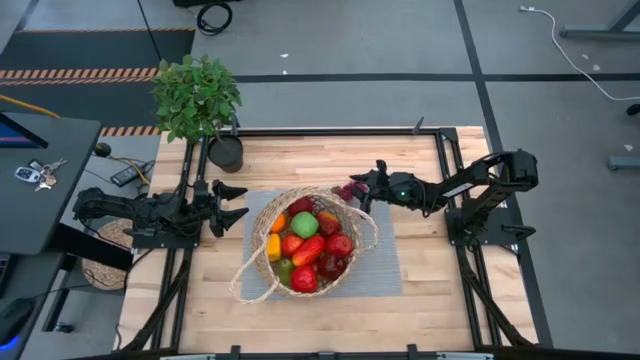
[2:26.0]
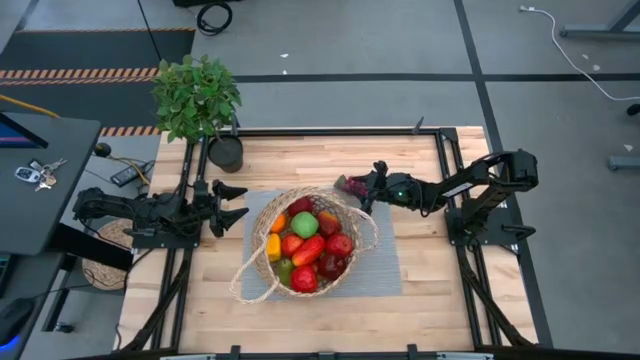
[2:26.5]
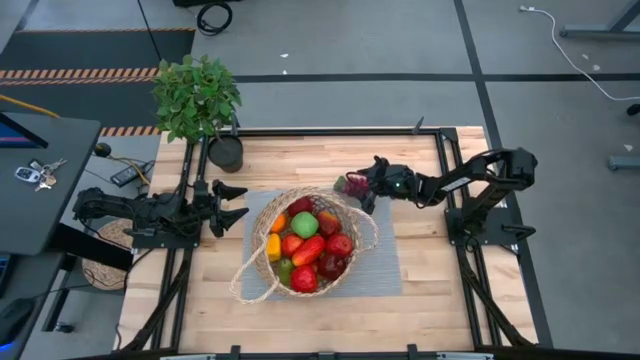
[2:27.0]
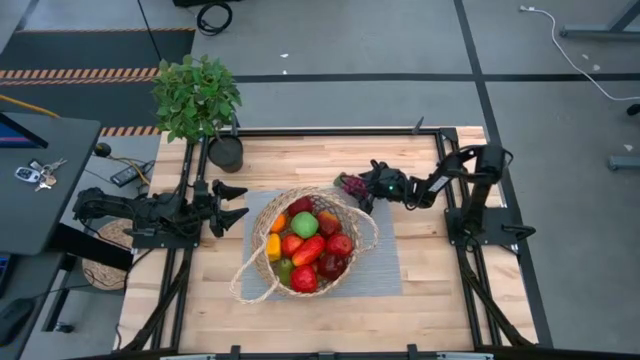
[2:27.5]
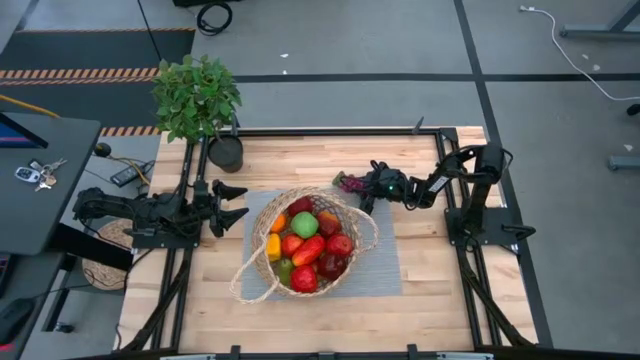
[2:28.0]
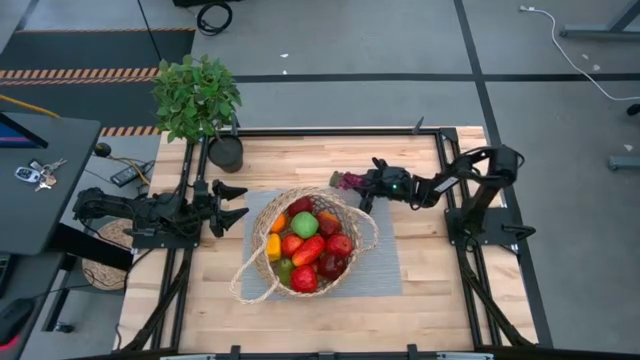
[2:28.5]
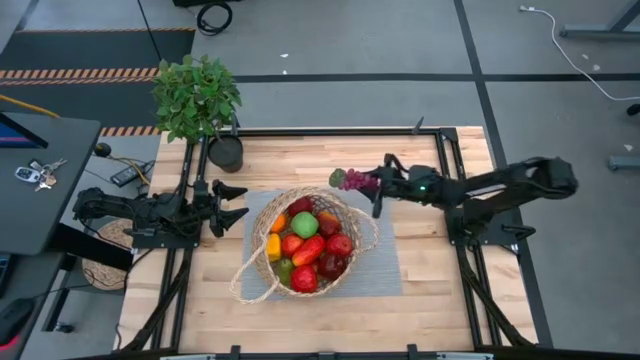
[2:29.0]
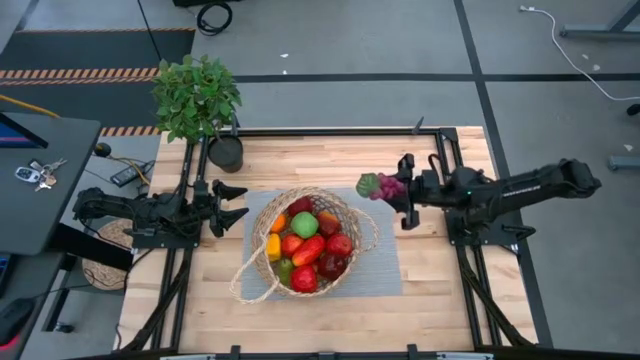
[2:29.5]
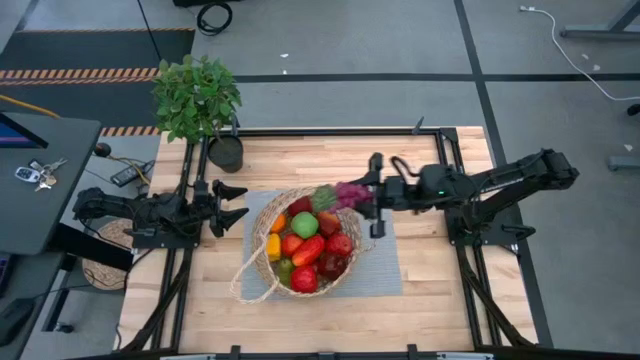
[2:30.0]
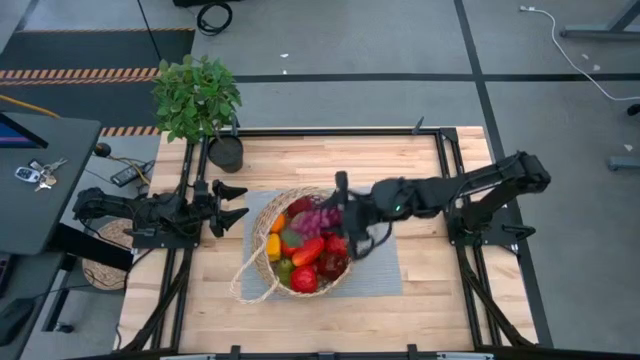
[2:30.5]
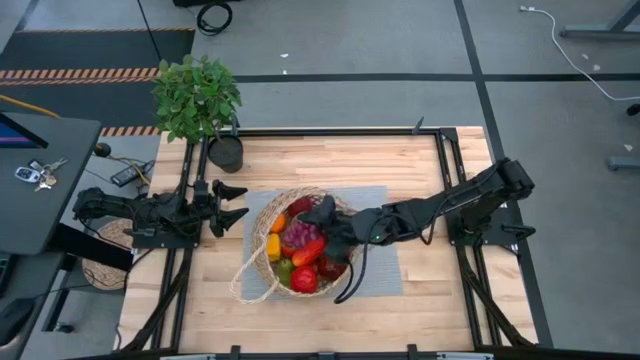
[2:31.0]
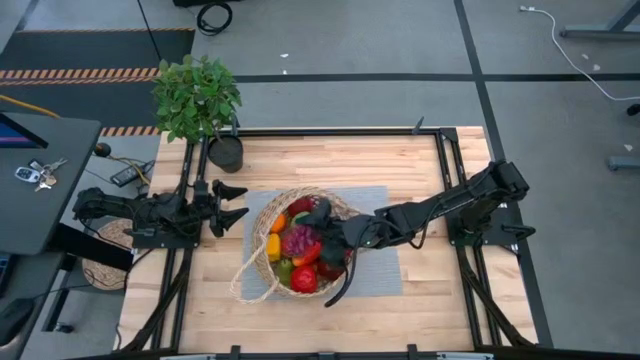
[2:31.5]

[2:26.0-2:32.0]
Task: Build produce basket
Put the red grapes into the brown basket

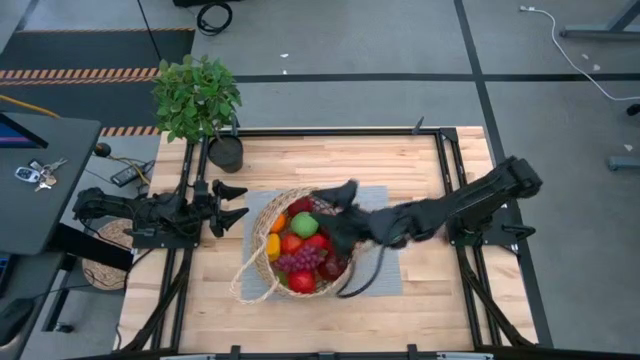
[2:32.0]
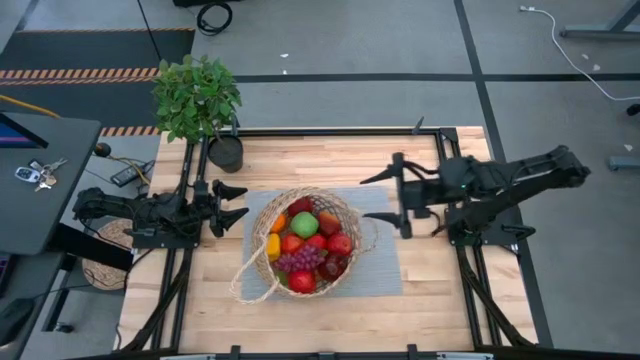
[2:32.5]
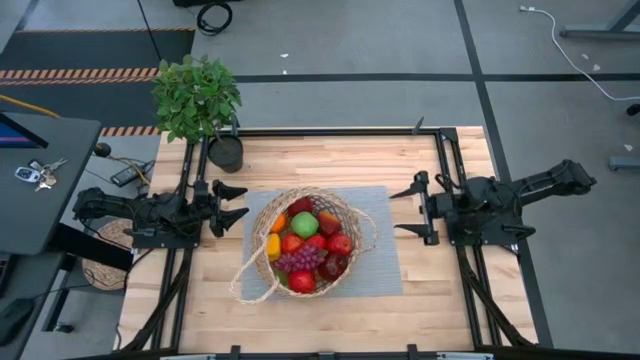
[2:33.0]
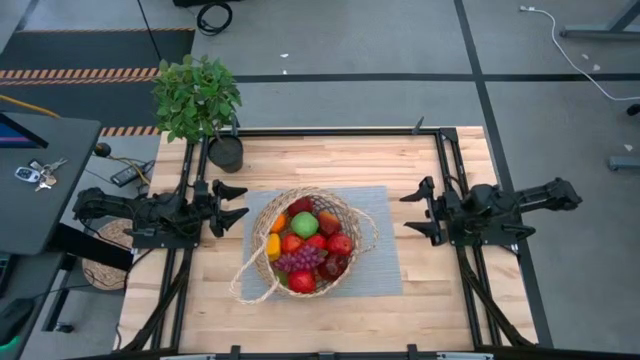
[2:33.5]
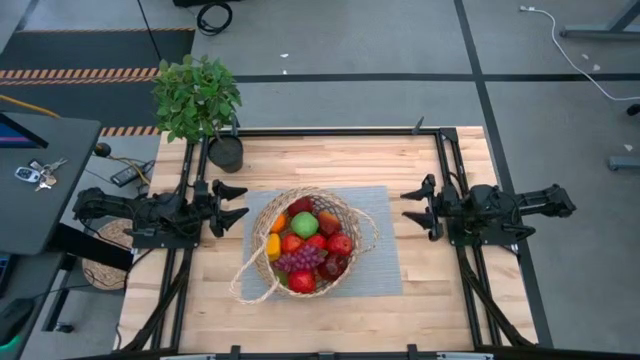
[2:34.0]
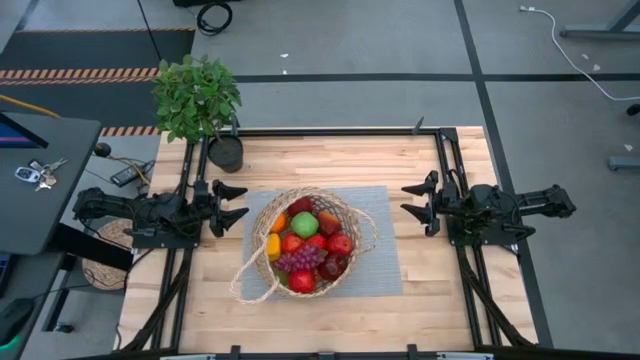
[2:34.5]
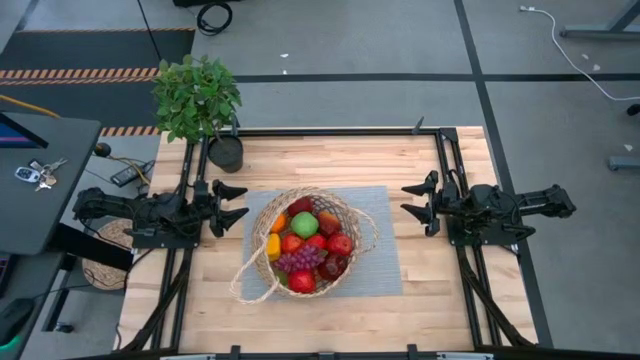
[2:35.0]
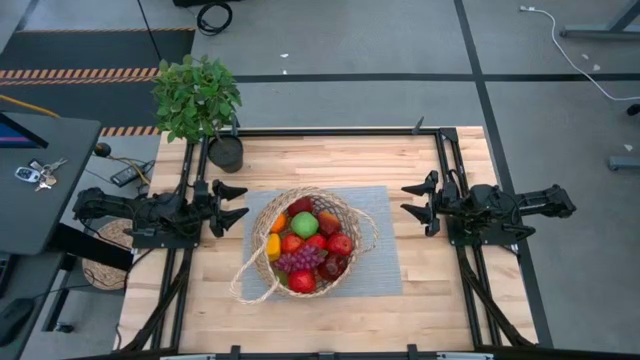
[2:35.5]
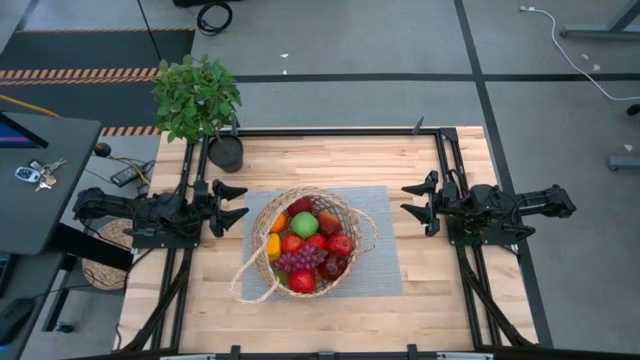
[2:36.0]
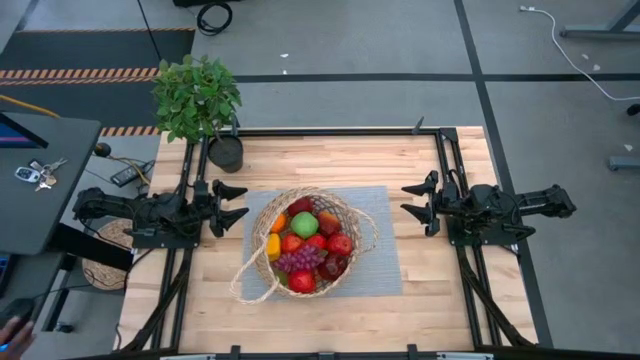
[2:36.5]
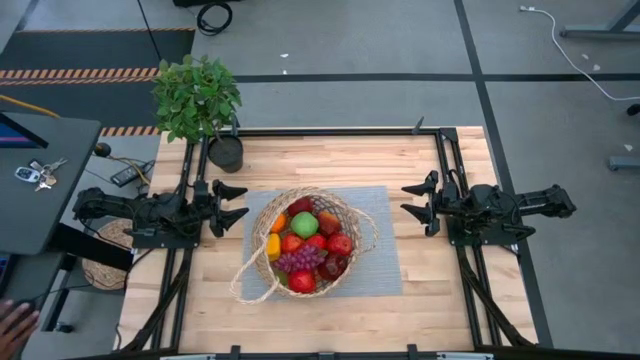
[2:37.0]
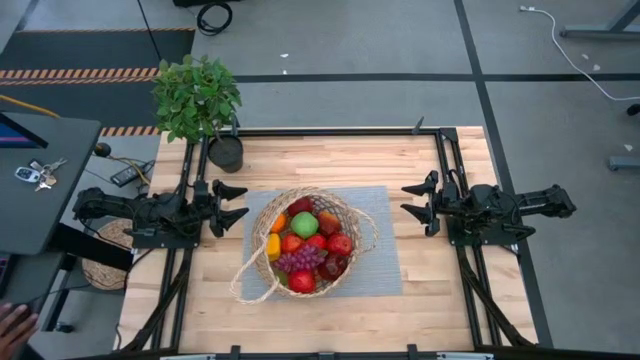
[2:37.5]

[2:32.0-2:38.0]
Return to Home Position

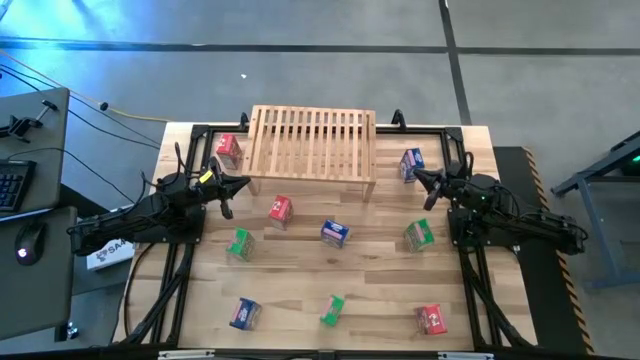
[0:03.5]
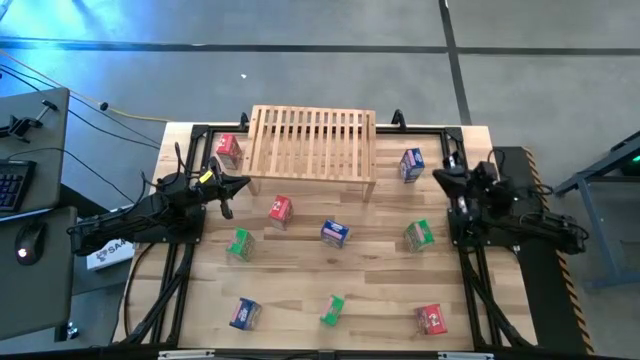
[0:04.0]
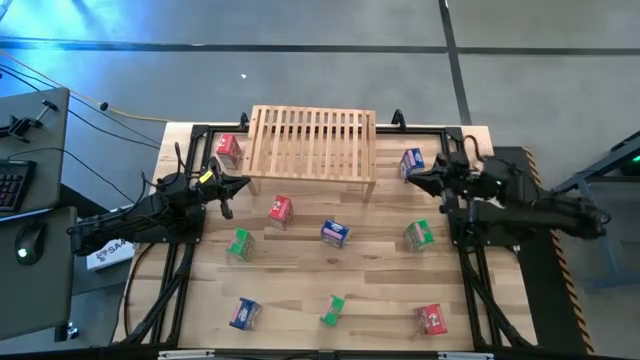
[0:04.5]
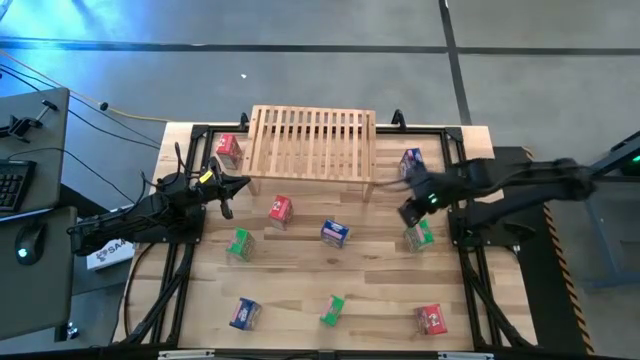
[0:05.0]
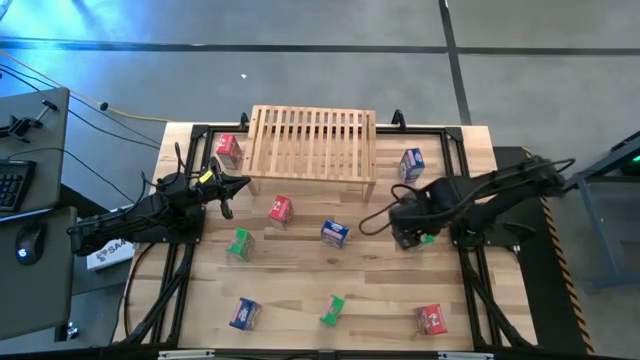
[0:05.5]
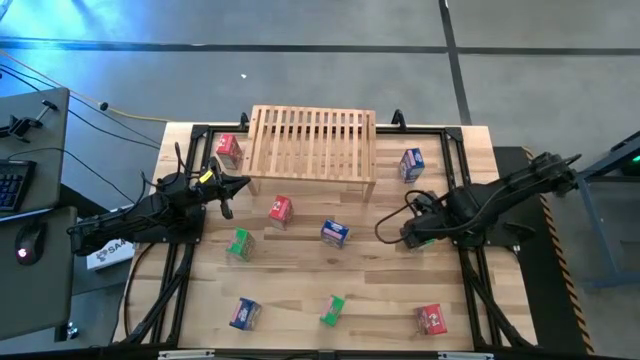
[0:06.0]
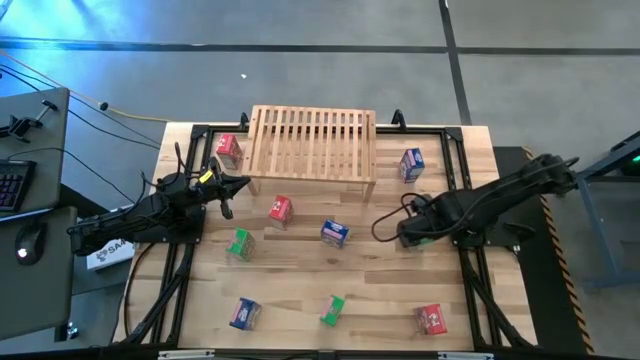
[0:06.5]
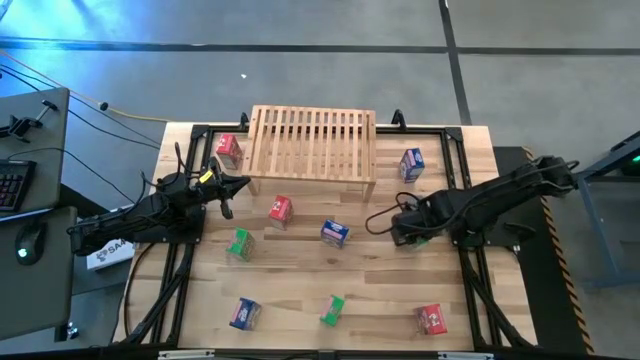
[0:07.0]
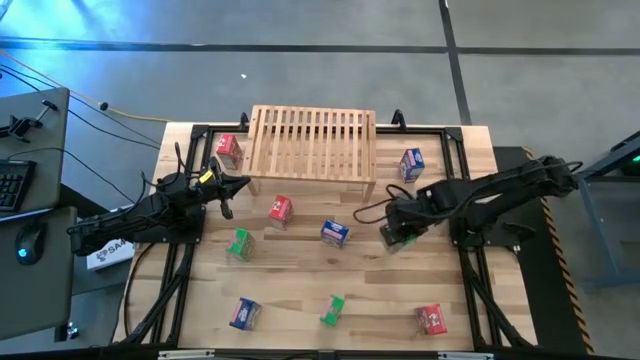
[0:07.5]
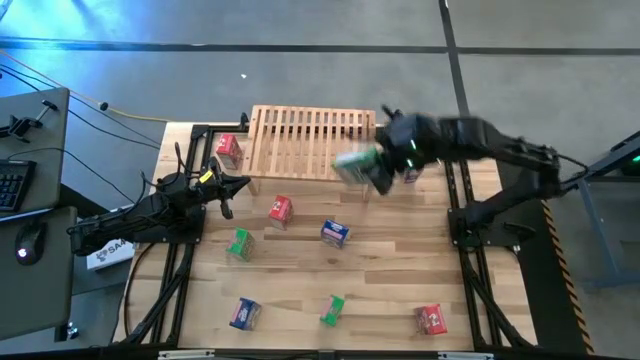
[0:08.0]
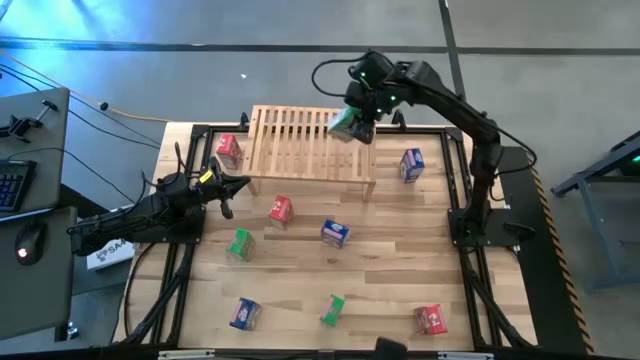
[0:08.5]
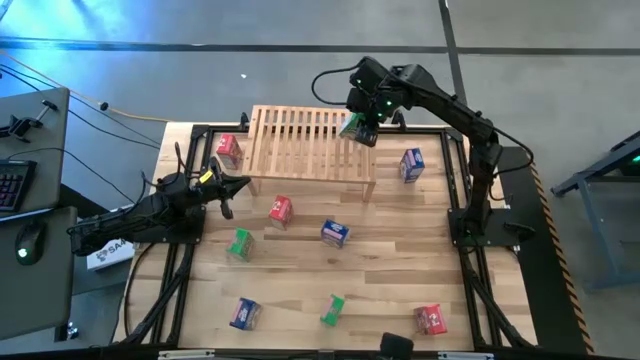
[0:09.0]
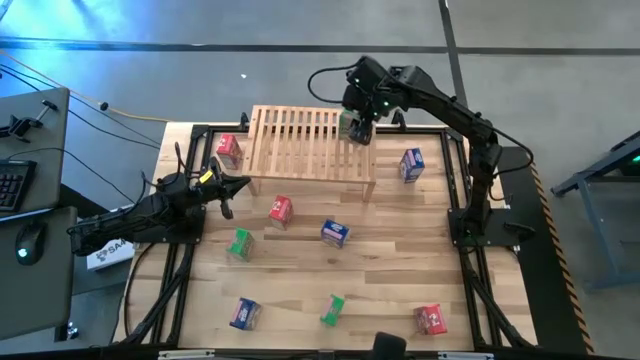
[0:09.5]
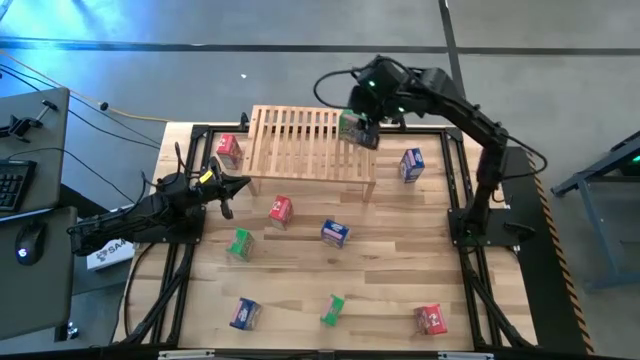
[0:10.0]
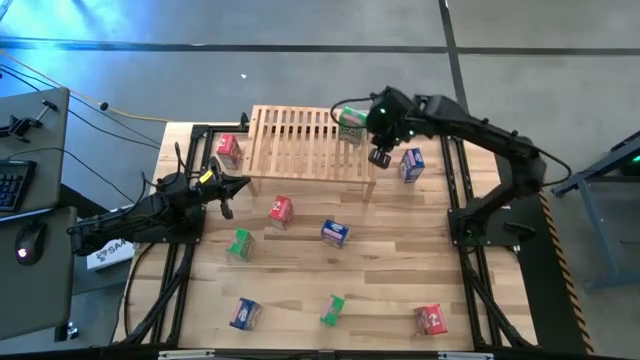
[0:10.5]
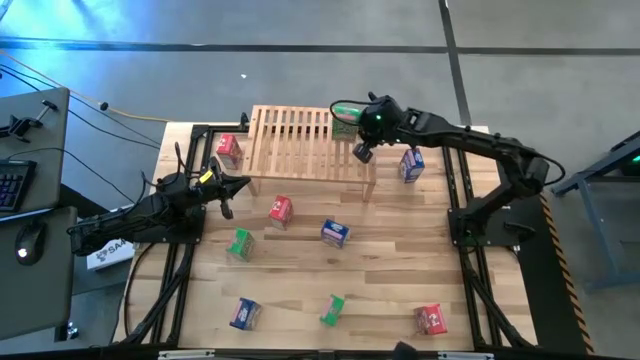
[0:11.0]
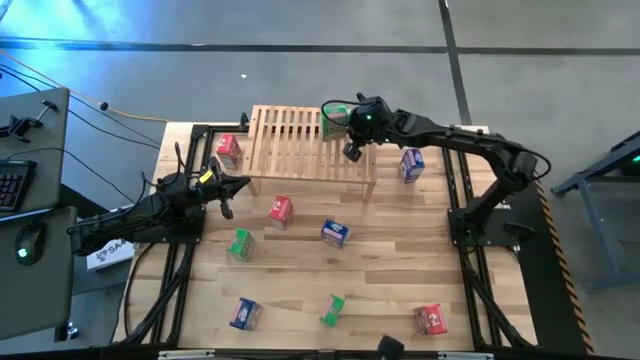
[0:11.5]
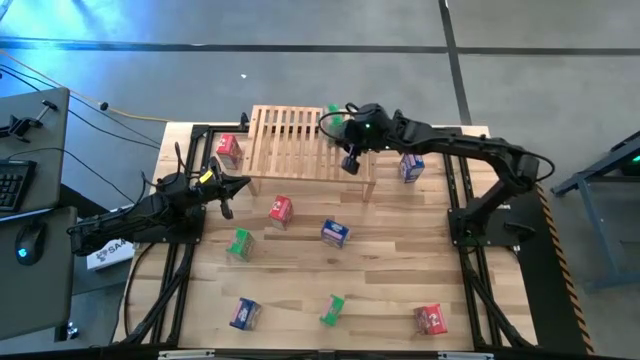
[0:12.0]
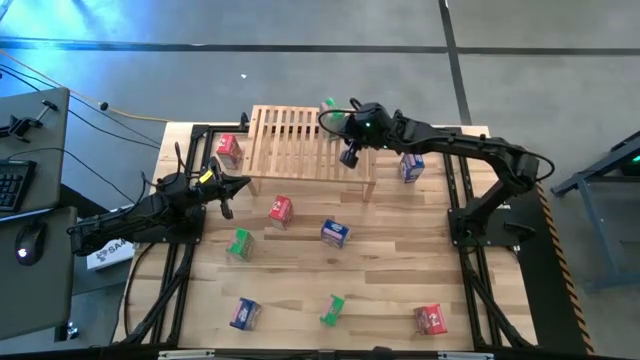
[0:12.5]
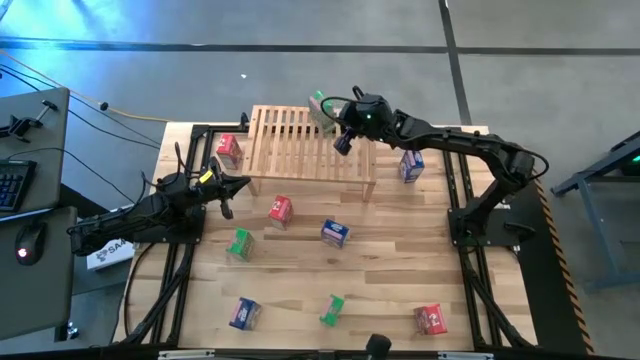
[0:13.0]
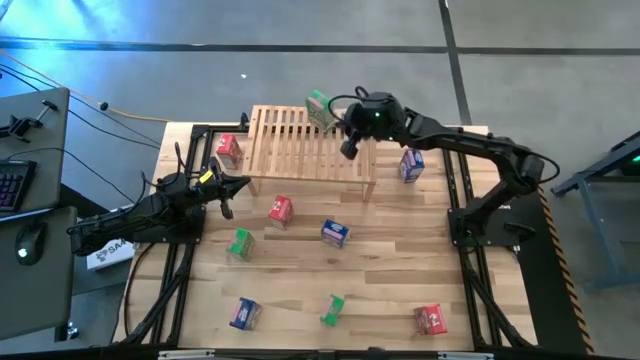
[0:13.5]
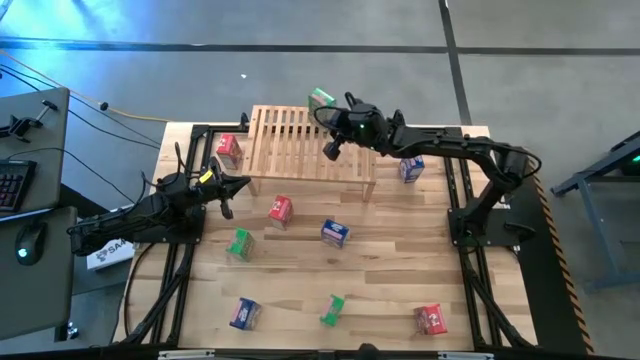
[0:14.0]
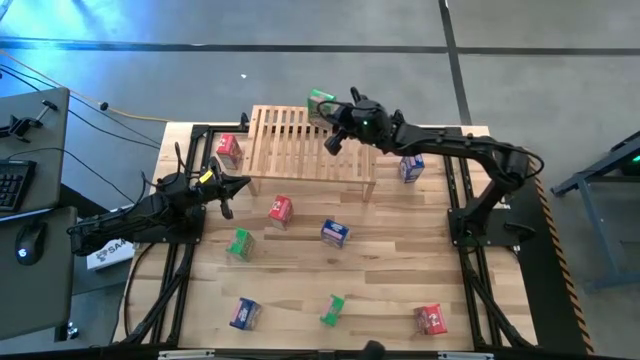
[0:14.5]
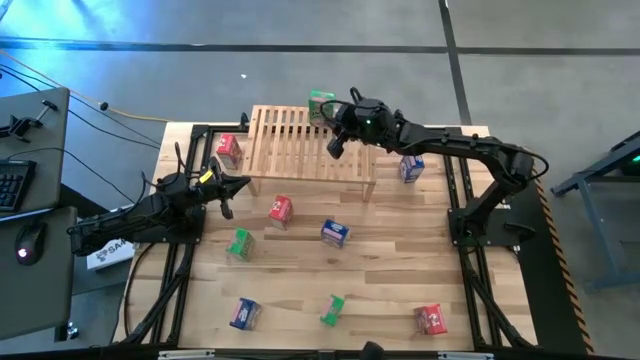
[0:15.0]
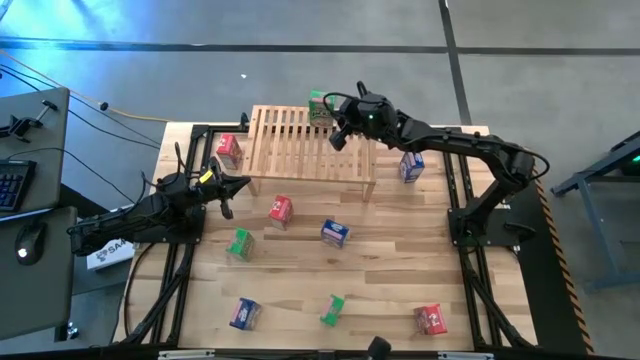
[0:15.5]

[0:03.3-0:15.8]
Task: Stack cereal on shelf
Put the top right green cereal box on the shelf
